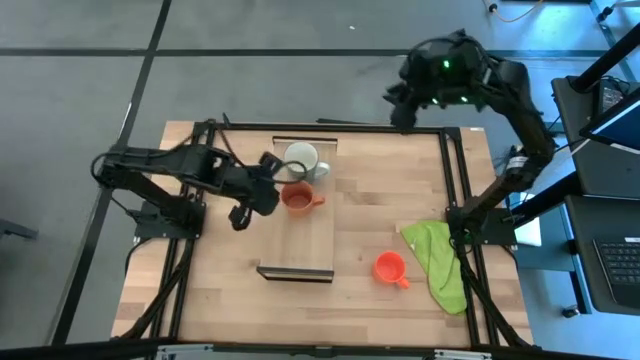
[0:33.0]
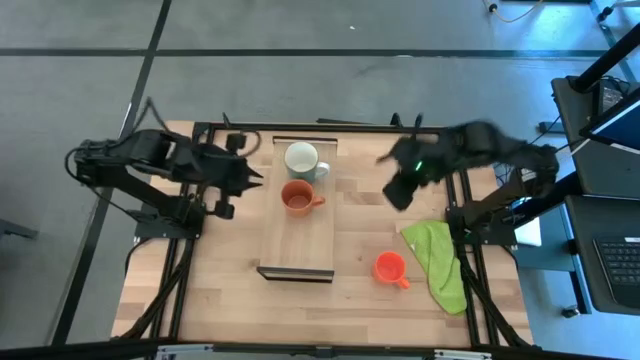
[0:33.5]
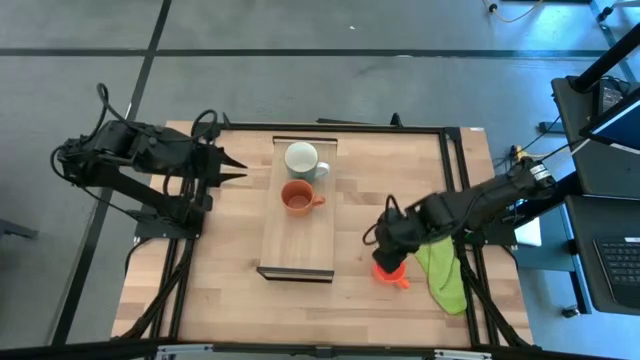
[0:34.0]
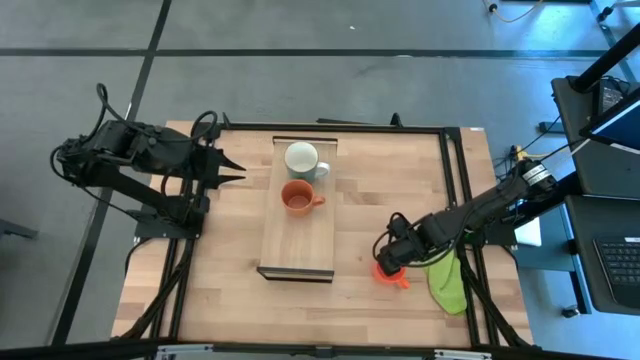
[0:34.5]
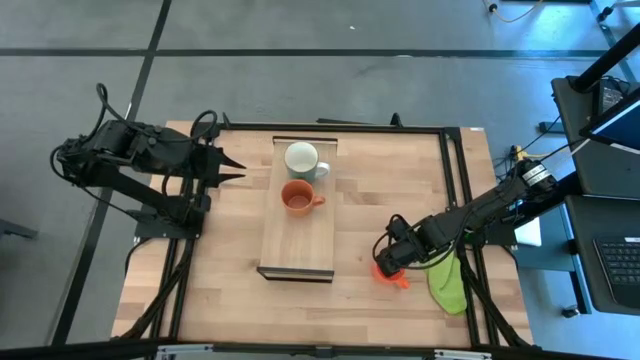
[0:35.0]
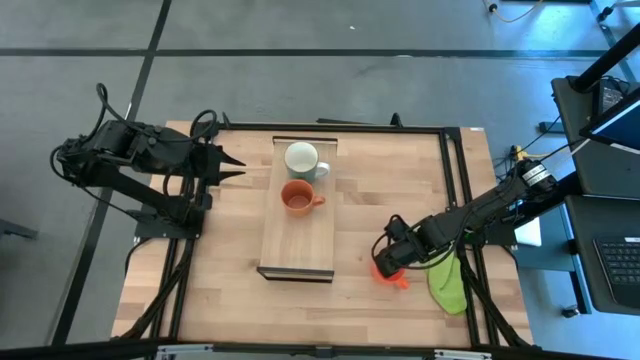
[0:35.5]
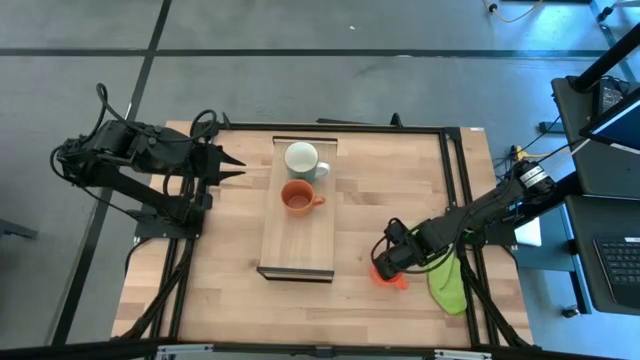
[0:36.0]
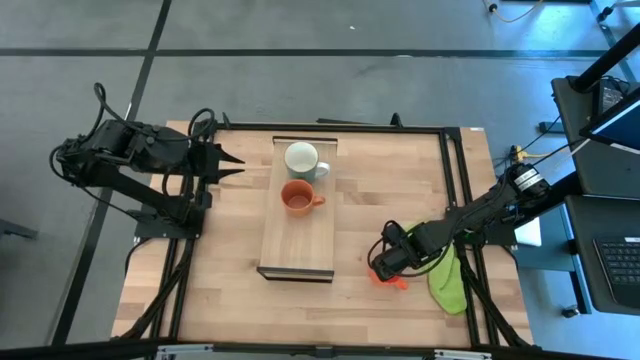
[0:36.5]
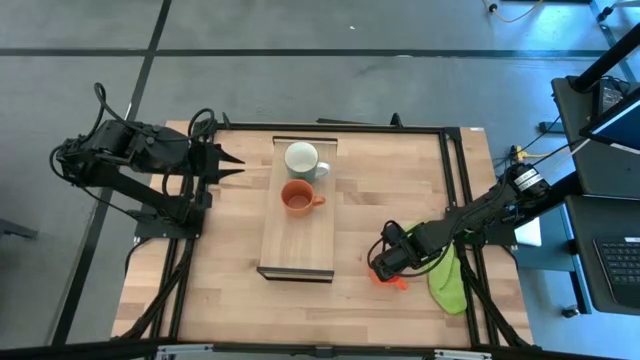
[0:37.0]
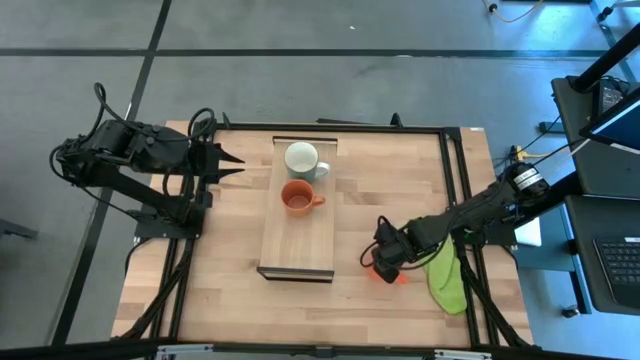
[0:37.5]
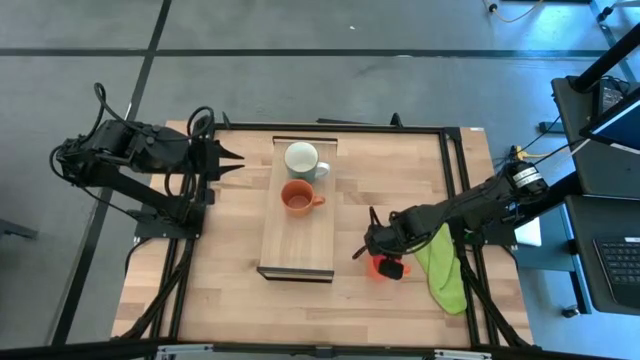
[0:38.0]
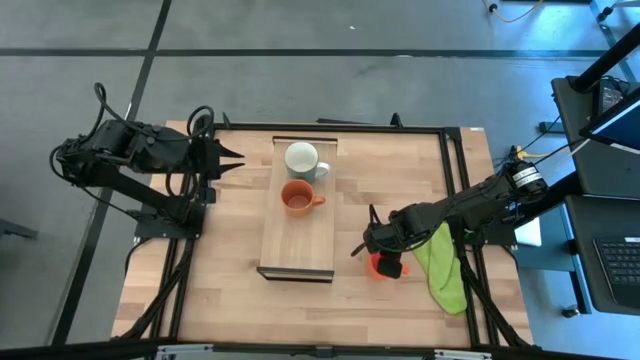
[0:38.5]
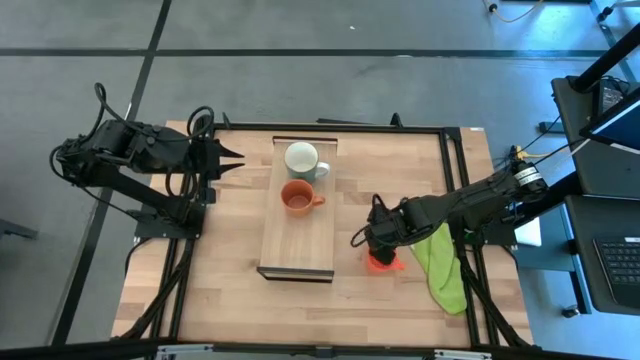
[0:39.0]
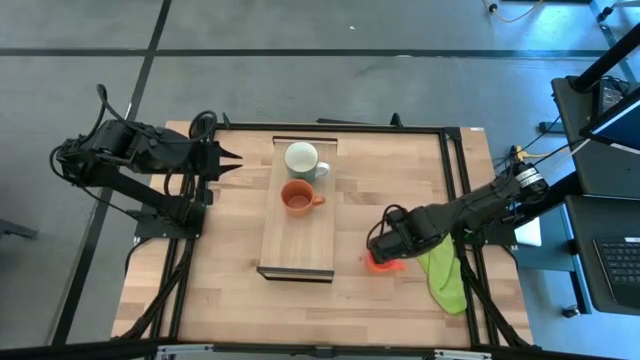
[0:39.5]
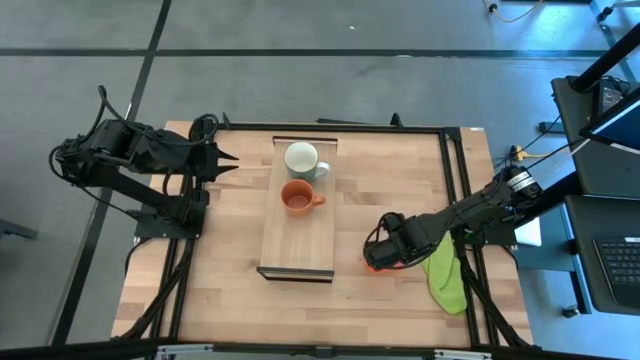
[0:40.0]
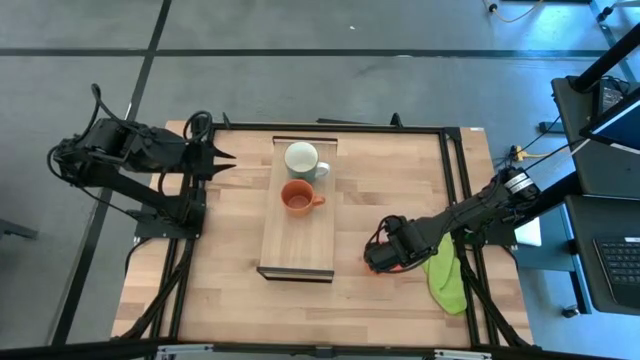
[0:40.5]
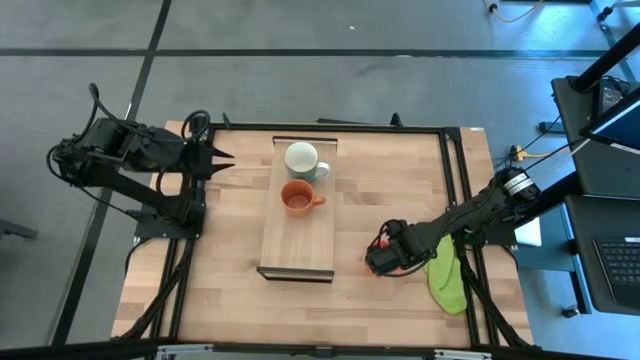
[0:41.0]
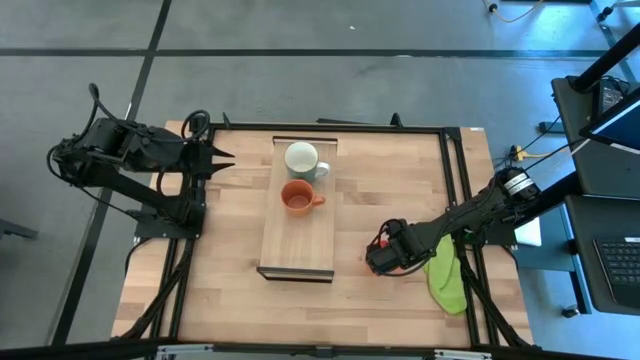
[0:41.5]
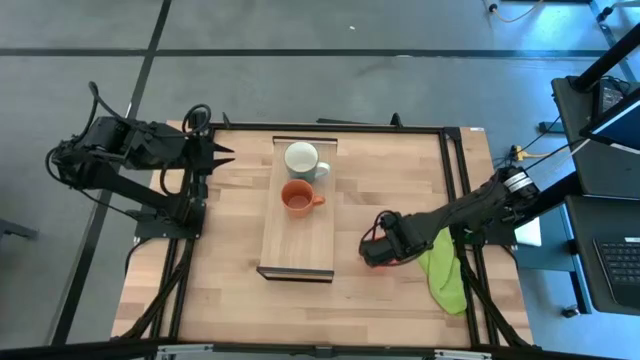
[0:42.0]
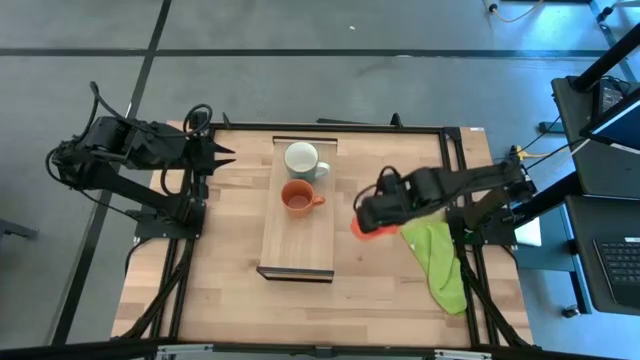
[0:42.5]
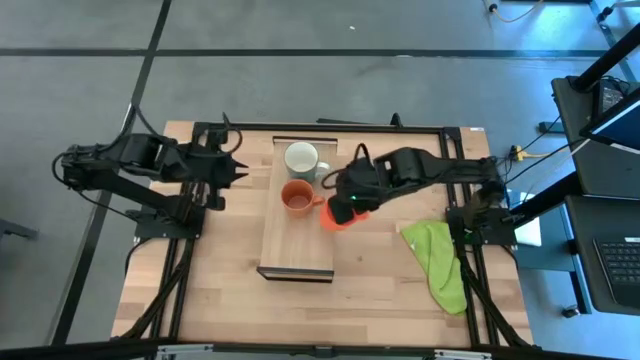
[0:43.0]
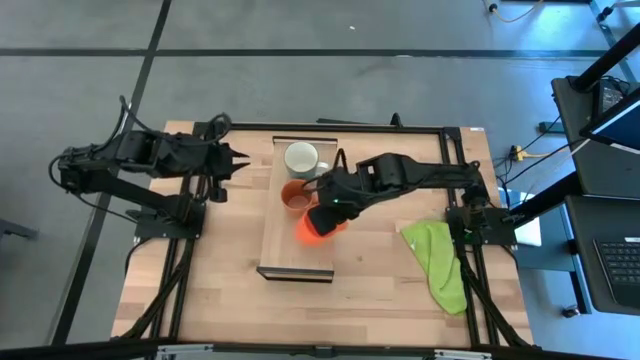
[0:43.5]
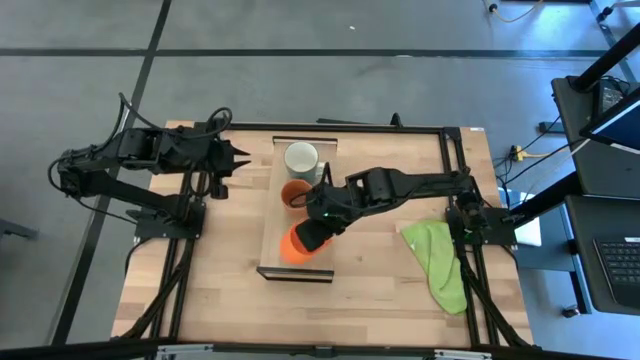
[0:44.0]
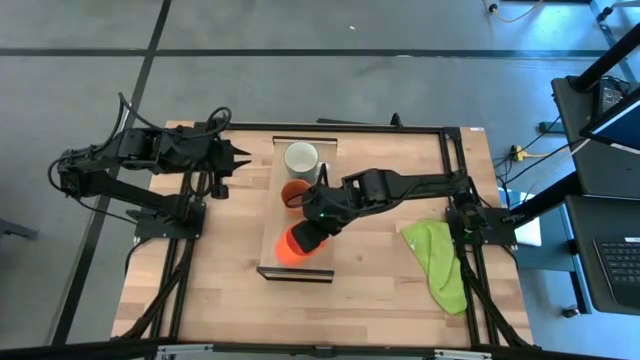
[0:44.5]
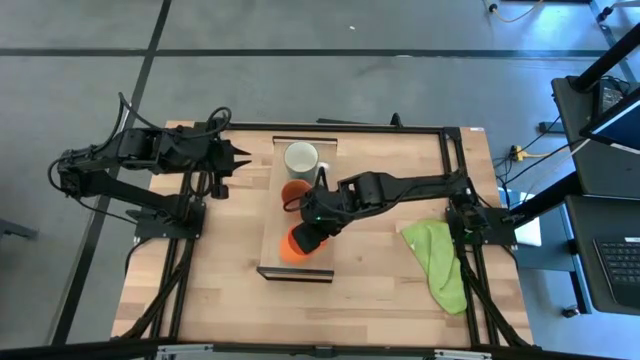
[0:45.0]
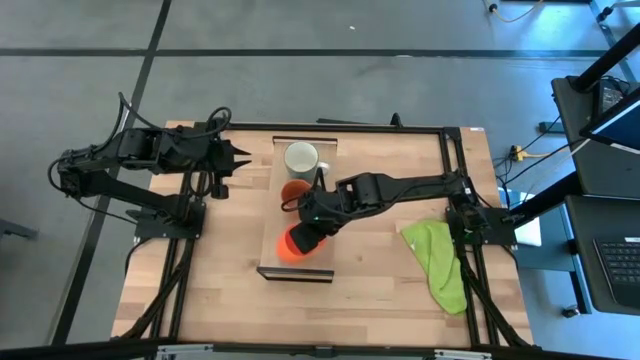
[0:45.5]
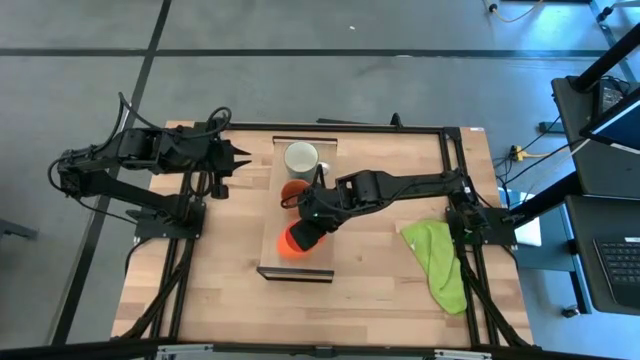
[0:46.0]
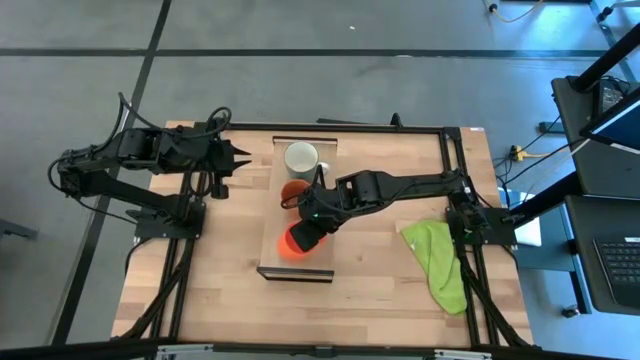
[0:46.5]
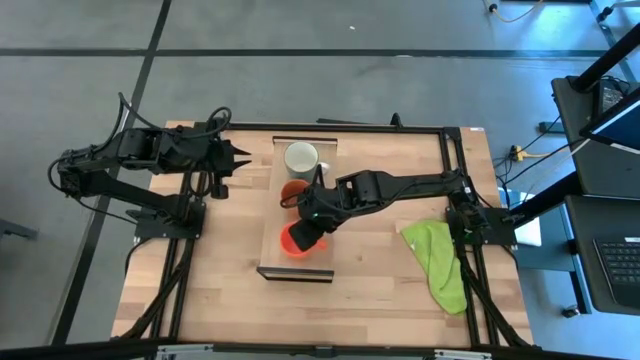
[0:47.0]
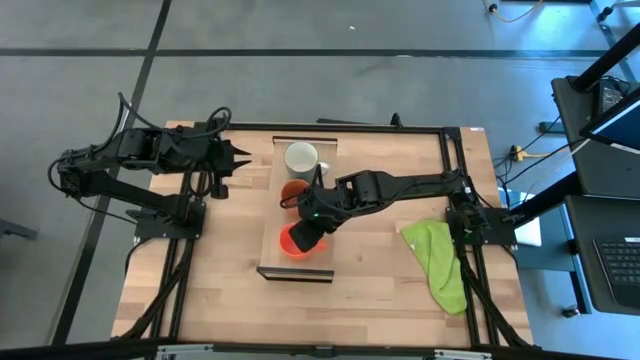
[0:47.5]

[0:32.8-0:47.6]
Task: Stack small to large cups/mugs on shelf
Put the orange mug on the shelf

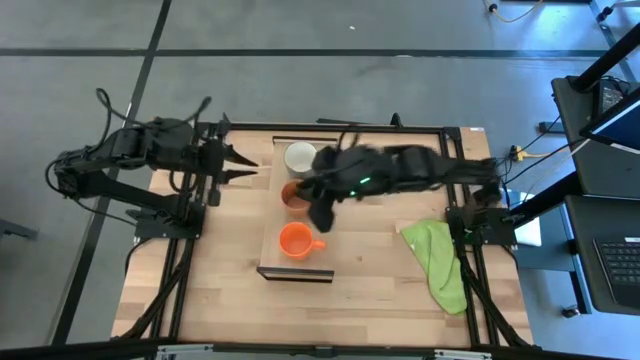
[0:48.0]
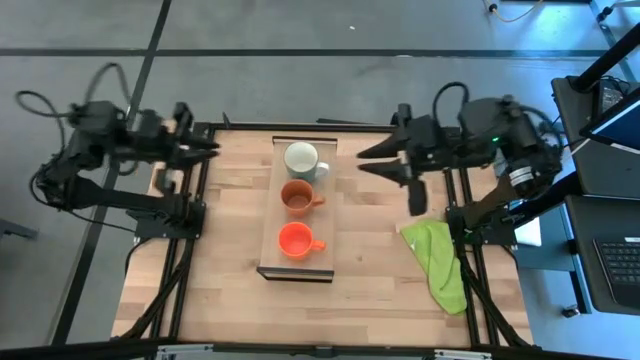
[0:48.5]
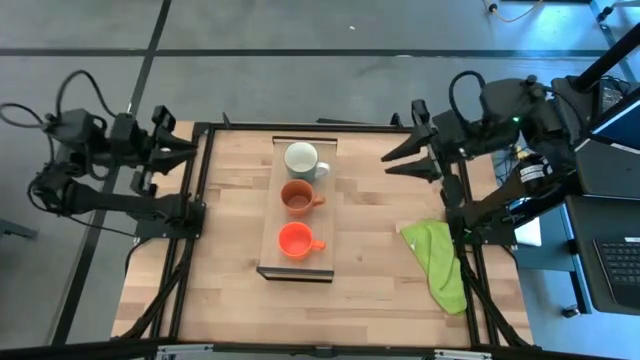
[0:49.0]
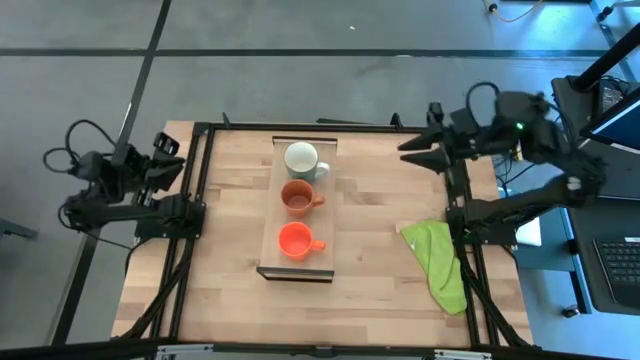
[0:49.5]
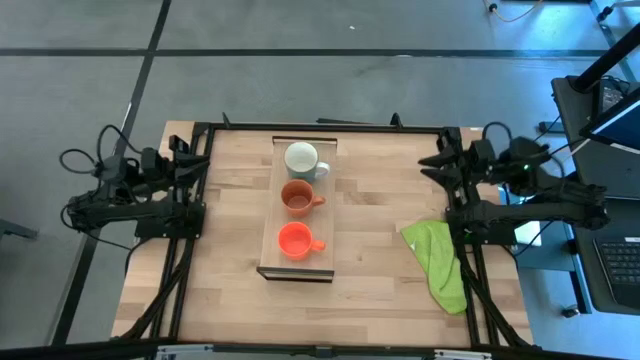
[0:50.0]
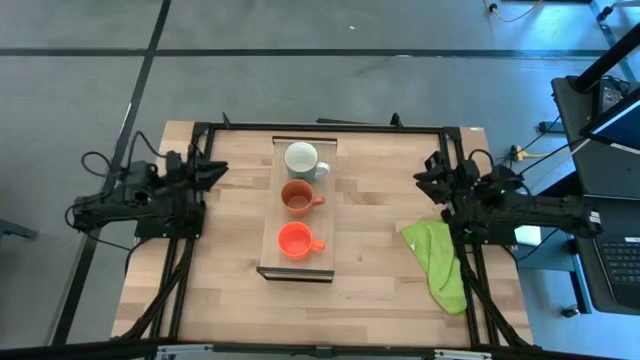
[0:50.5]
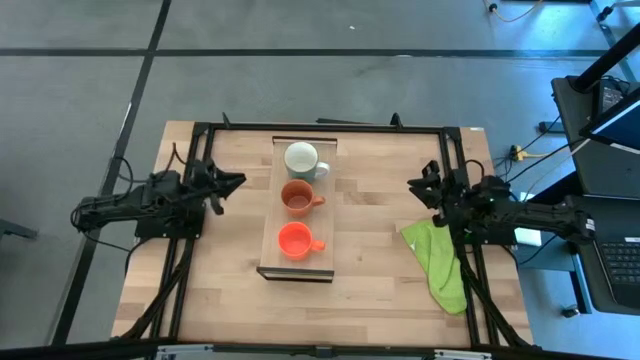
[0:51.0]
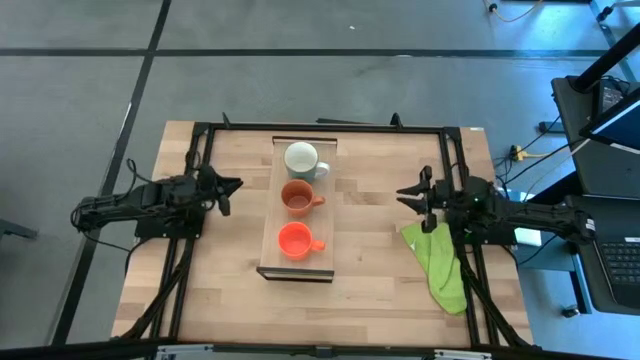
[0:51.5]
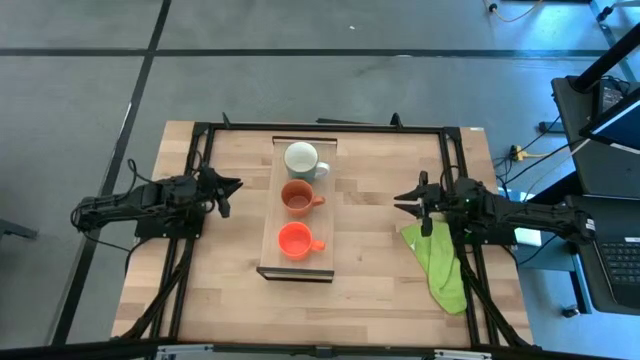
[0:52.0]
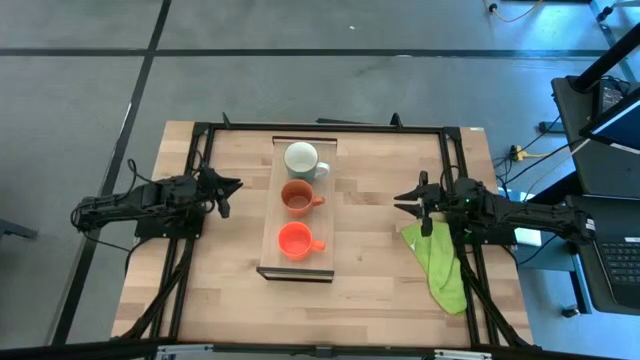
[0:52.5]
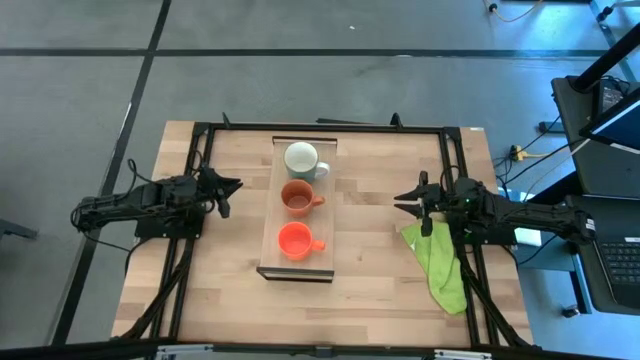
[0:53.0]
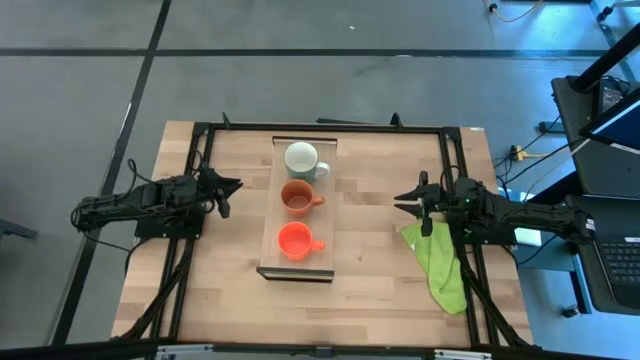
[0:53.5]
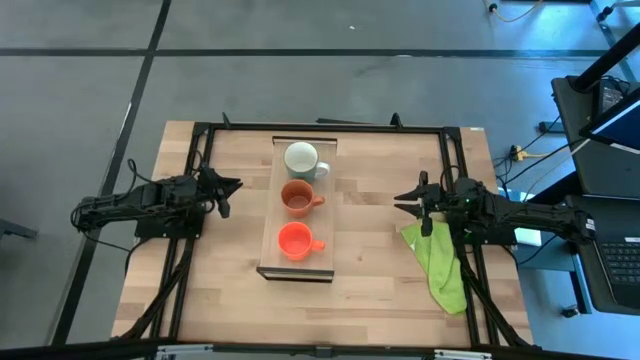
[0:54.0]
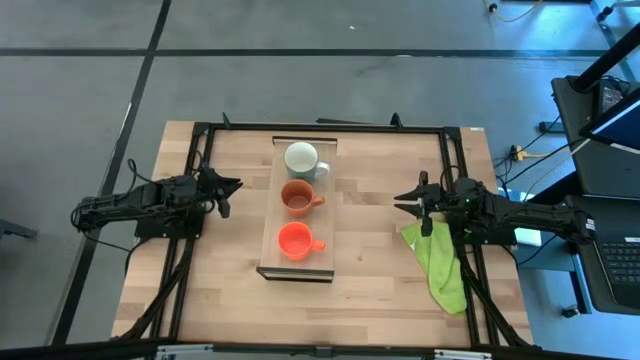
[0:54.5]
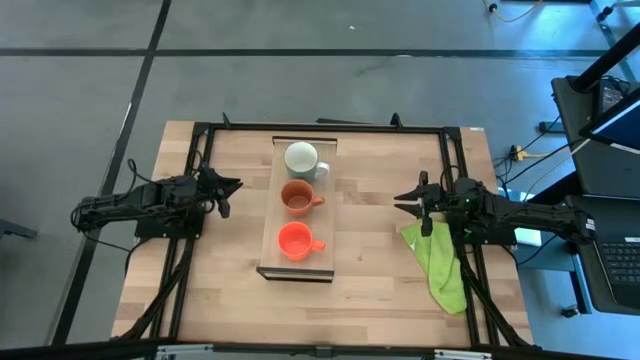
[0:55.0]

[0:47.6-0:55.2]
Return to Home Position
